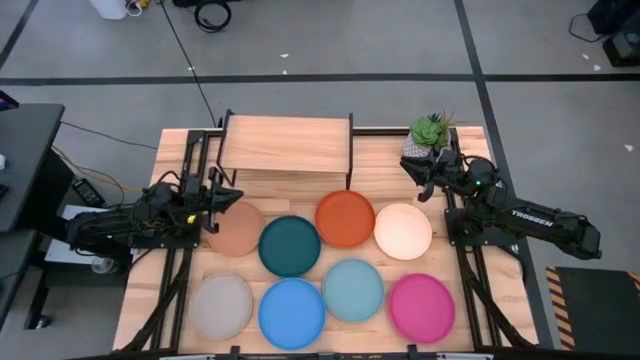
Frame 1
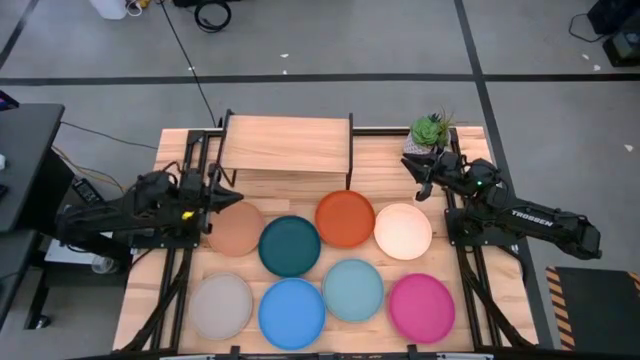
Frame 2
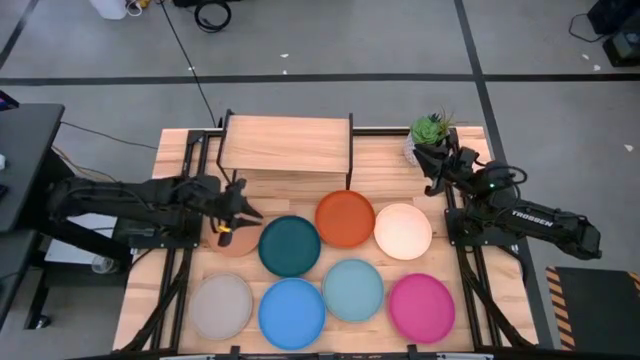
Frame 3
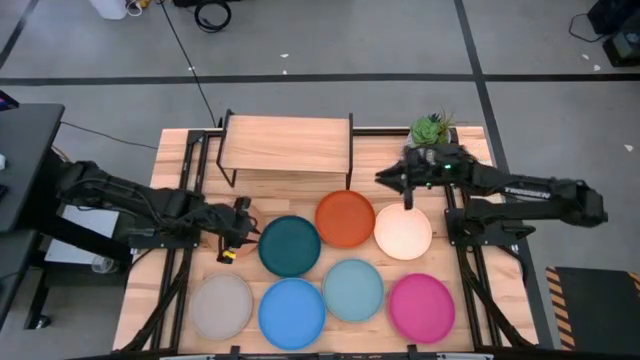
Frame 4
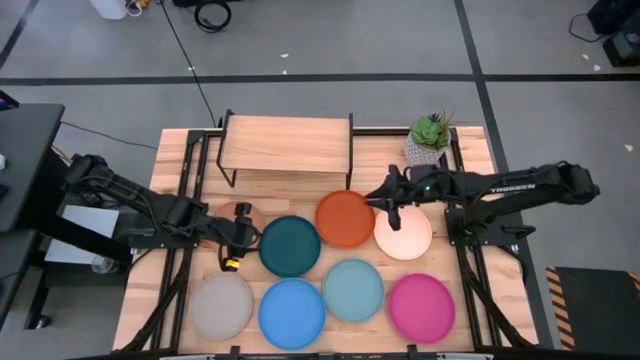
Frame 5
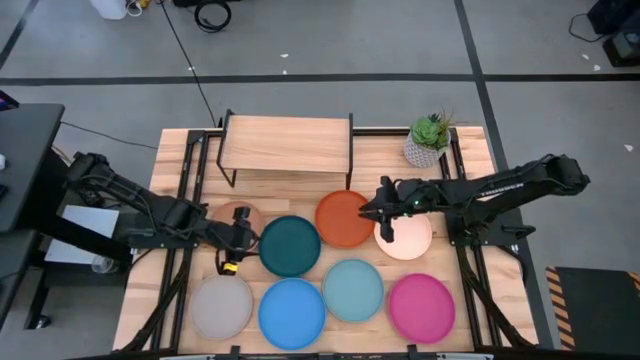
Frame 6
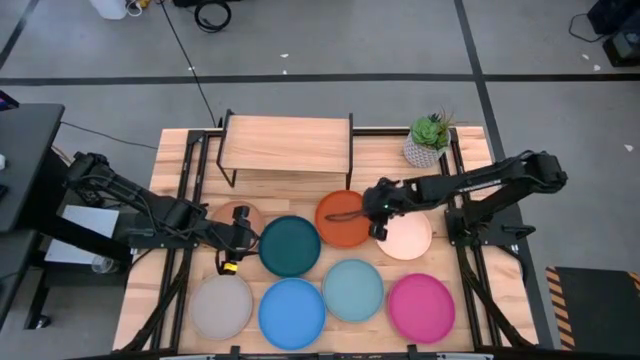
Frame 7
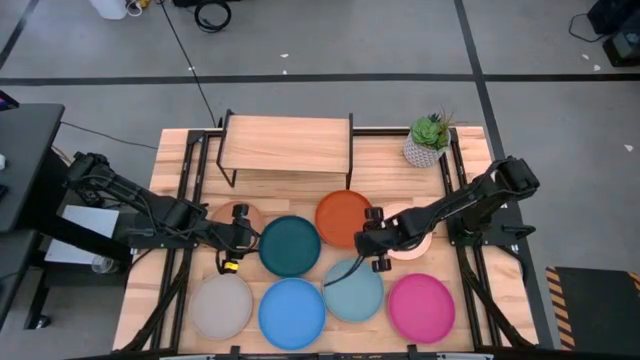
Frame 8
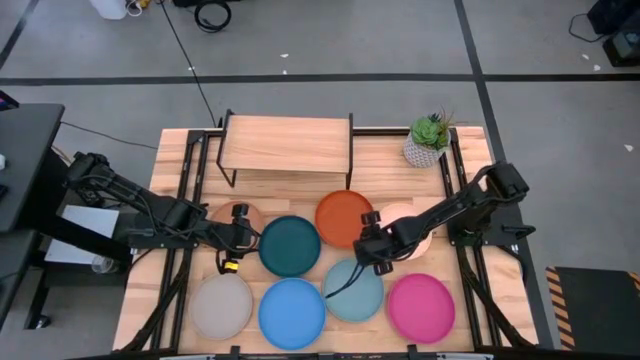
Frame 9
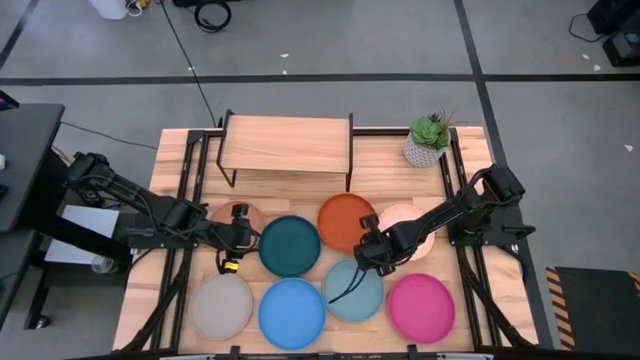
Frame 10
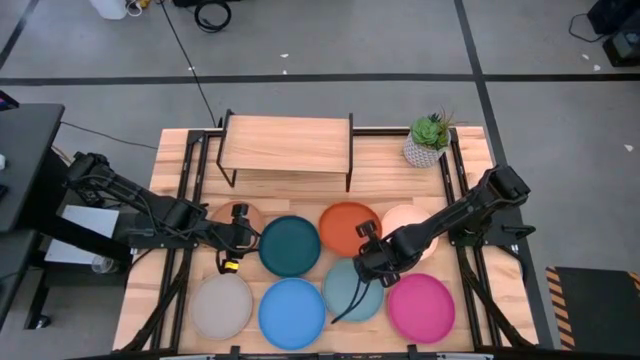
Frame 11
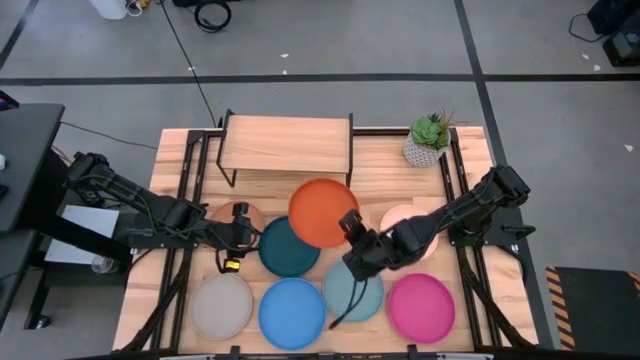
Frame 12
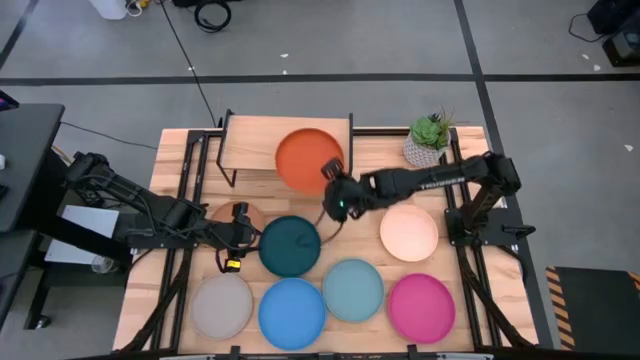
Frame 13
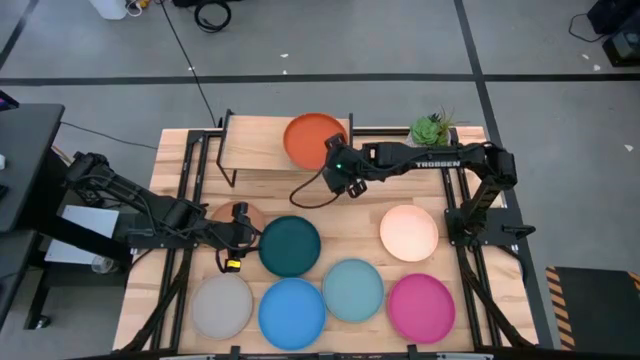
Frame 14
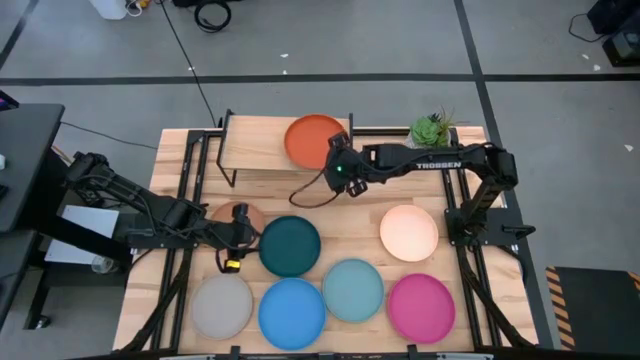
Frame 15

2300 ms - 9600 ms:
Task: Place and stack plates onto a shelf
Put the orange plate on the shelf

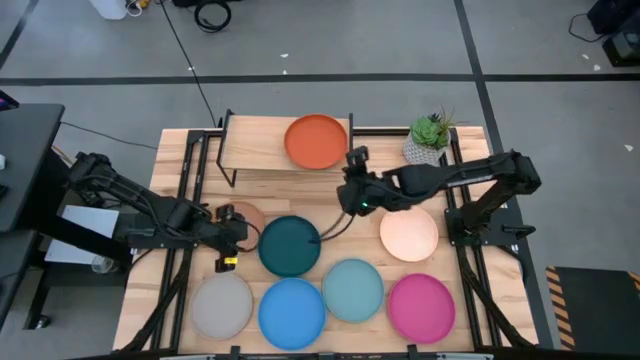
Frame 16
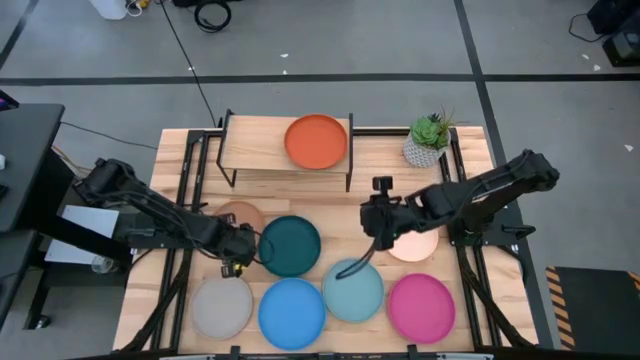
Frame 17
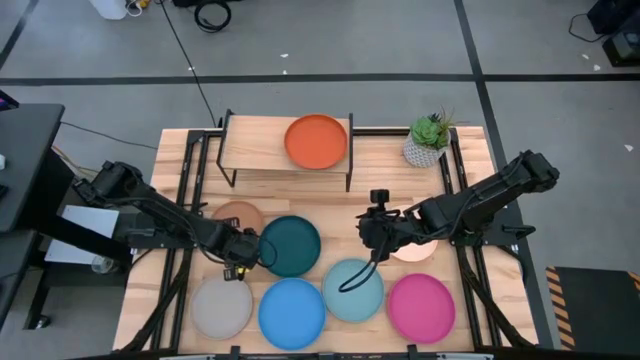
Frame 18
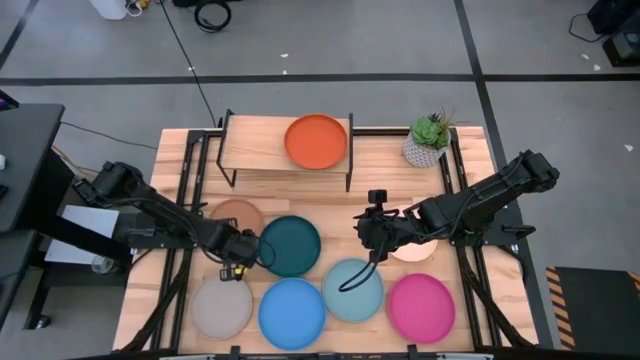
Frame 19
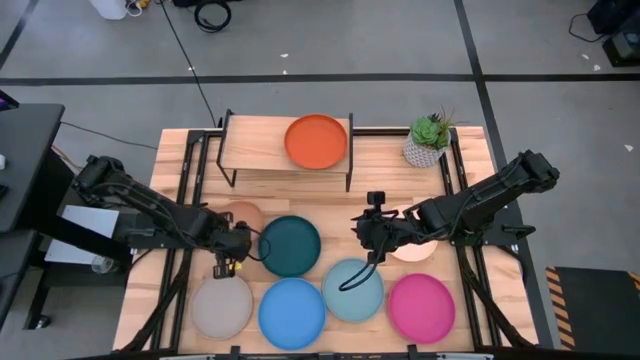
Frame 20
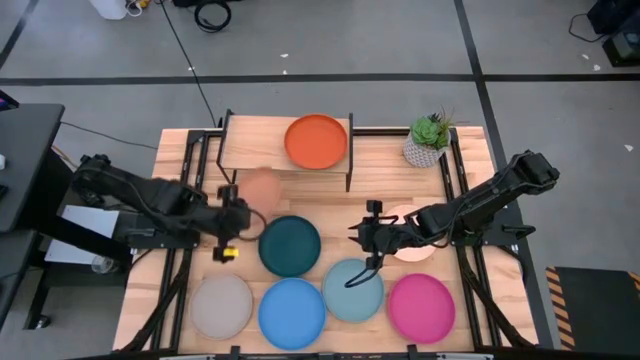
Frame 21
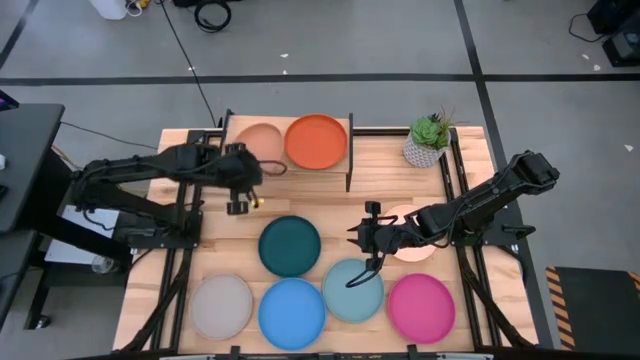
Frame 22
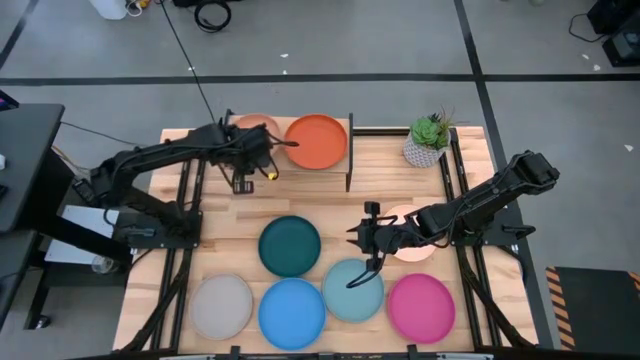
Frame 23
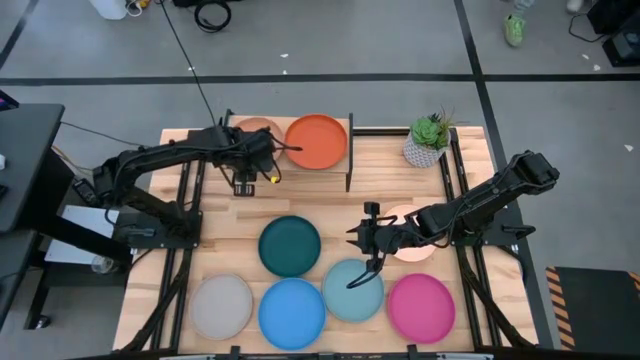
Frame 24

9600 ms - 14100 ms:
Put the brown plate on the shelf

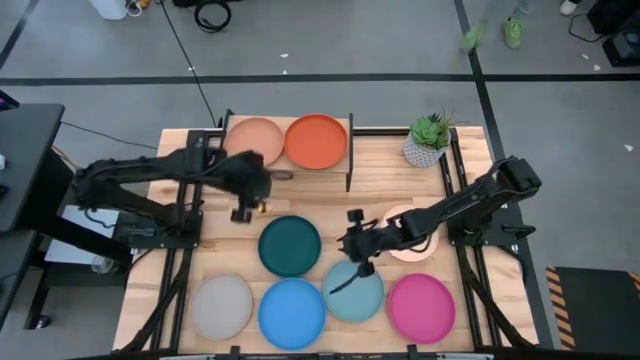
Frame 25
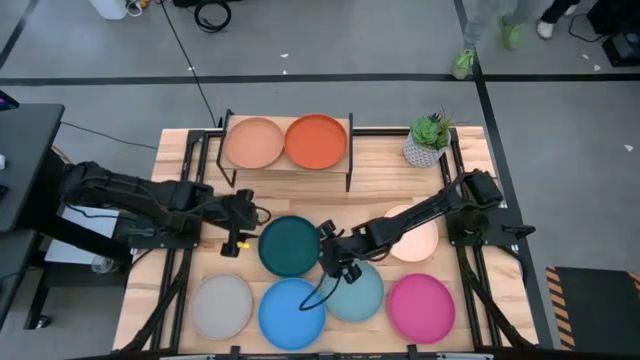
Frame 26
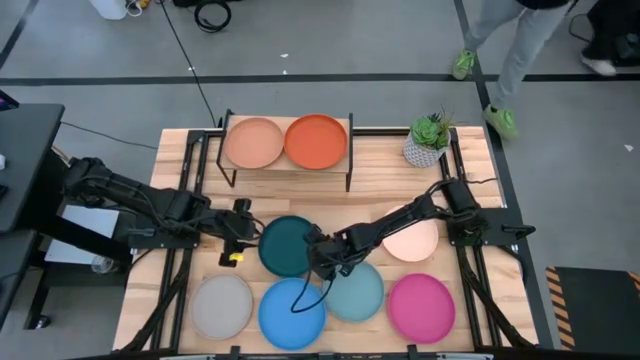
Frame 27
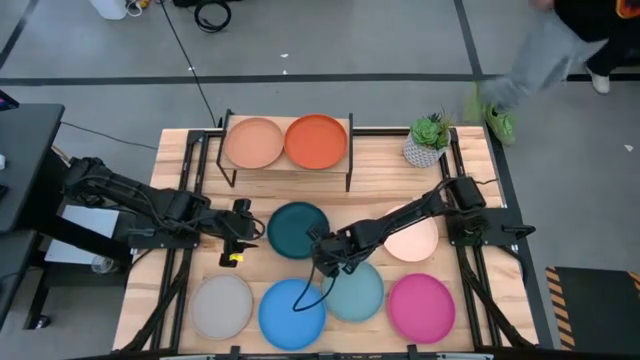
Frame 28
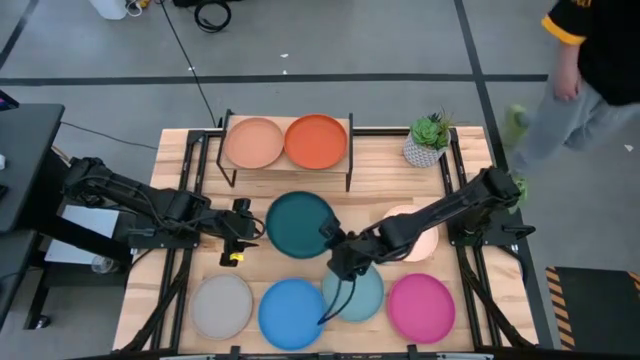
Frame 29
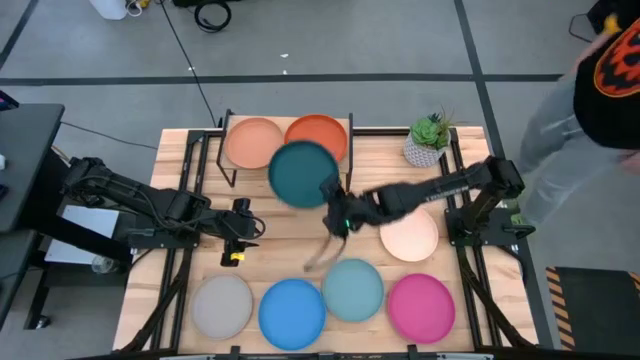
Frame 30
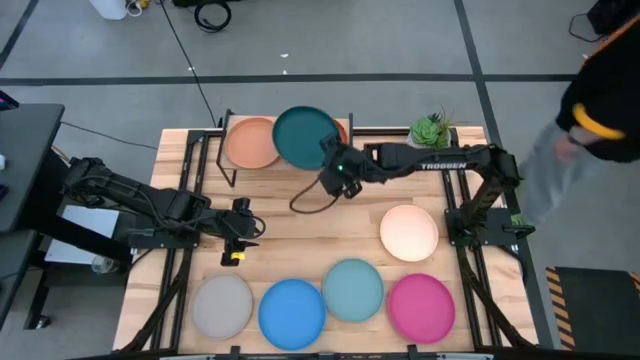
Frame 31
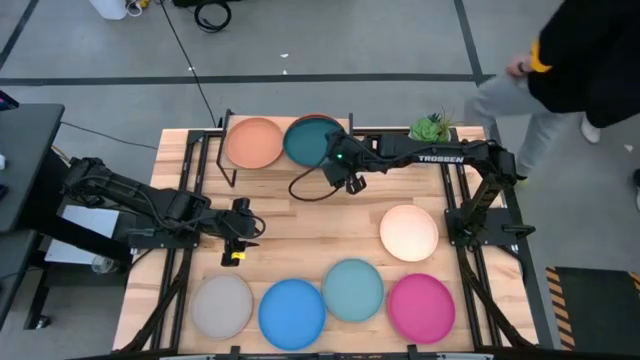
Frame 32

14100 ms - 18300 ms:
Stack the green plate on top of the orange plate on the shelf

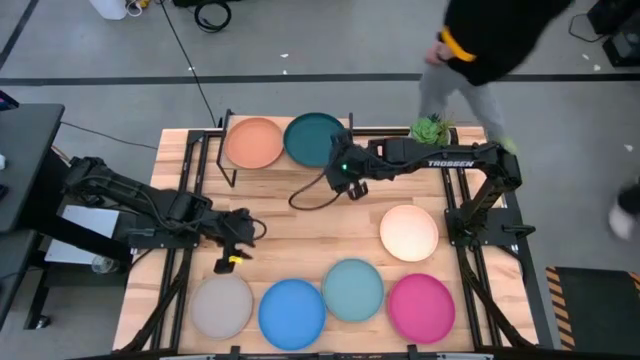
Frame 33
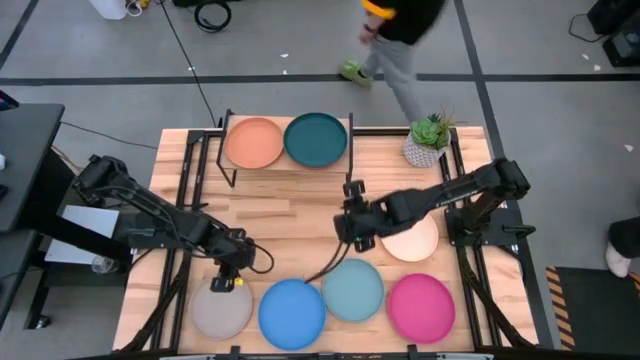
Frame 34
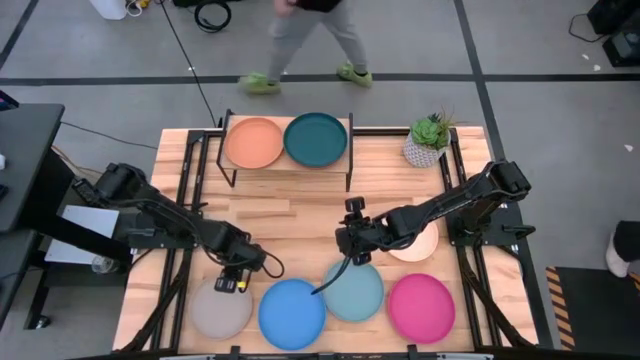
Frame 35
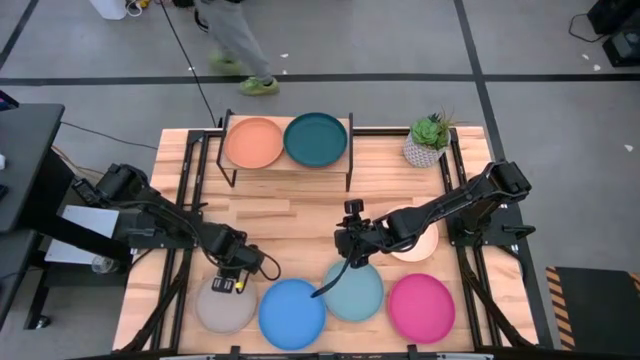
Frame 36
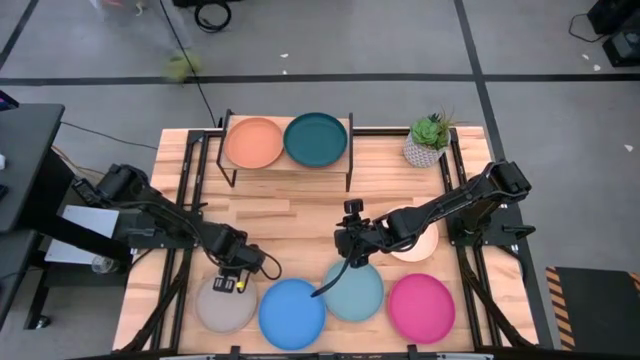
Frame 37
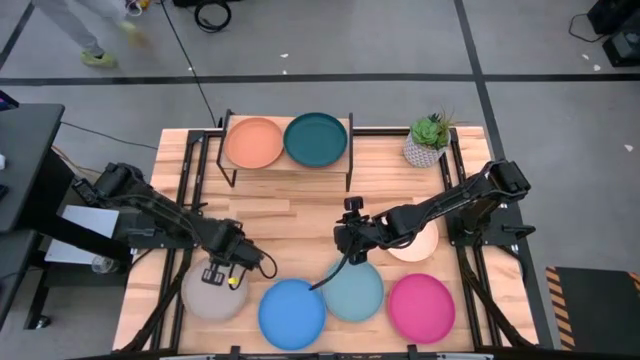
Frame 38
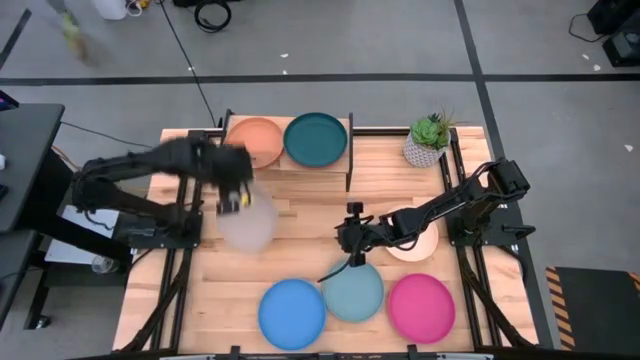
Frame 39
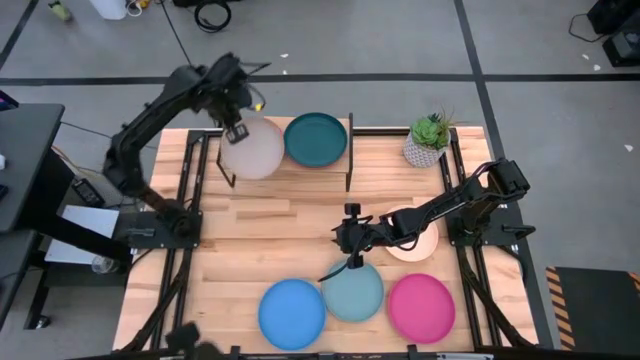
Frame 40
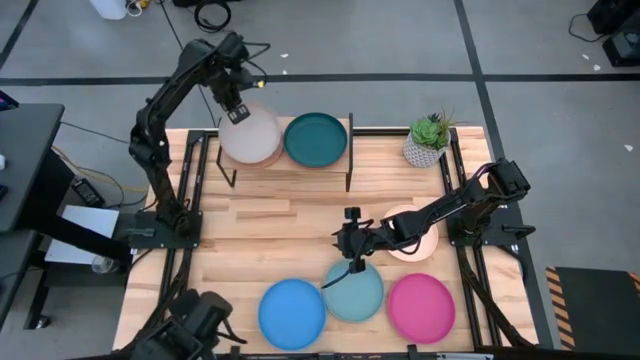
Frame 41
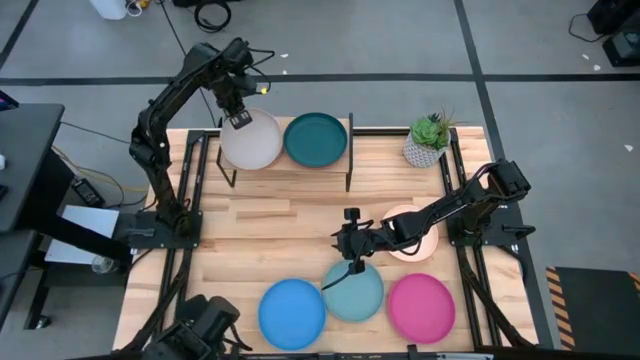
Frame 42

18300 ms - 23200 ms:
Stack the gray plate on top of the brown plate on the shelf

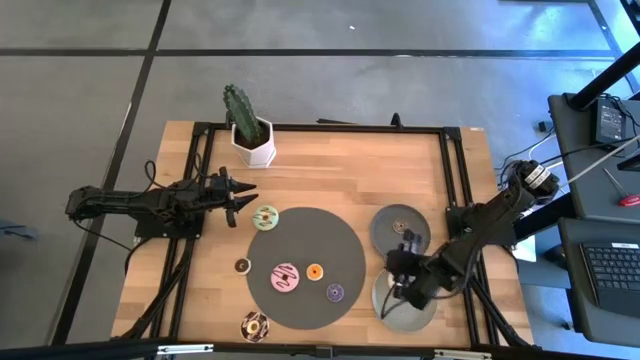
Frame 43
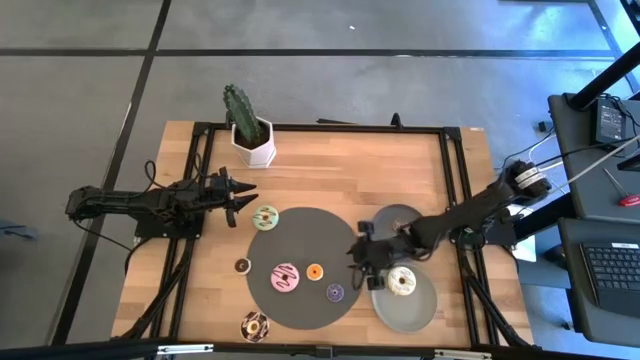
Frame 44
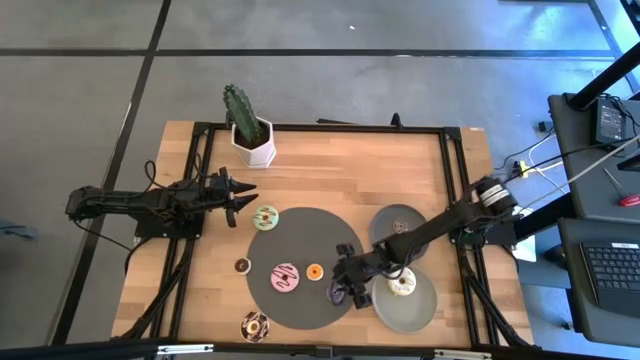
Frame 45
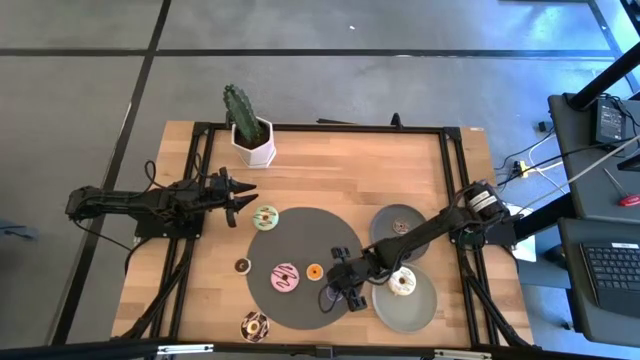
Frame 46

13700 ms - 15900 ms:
Task: Pick & Place donuts
Put the small blue donut on the dark gray plate
